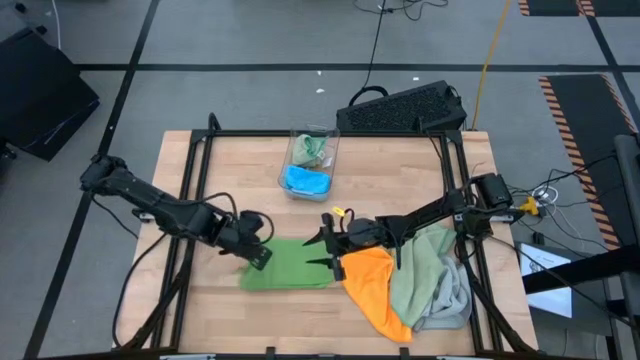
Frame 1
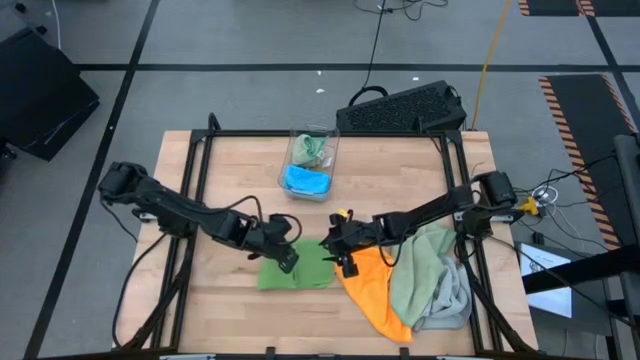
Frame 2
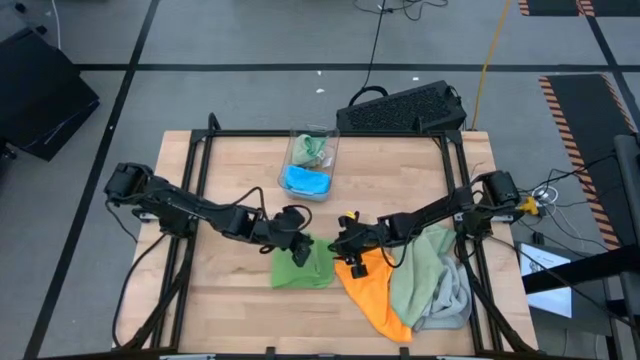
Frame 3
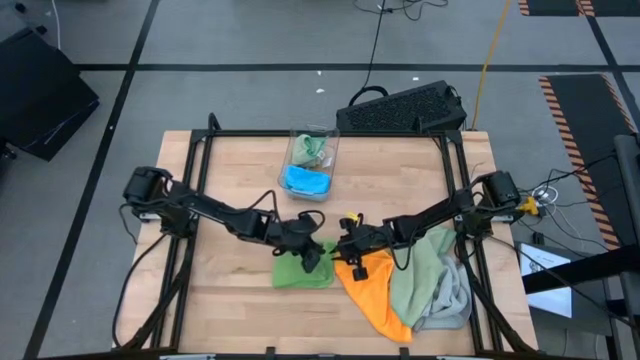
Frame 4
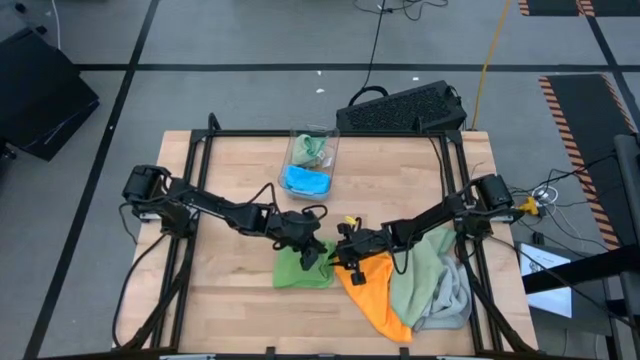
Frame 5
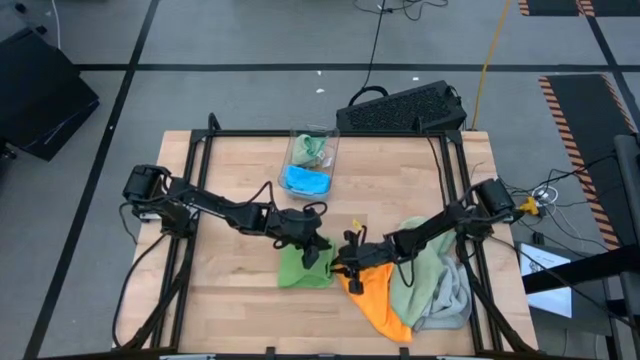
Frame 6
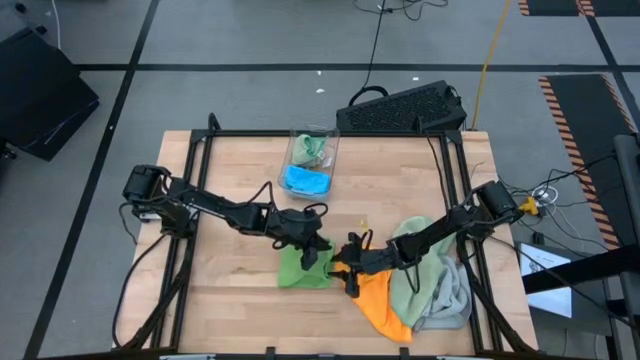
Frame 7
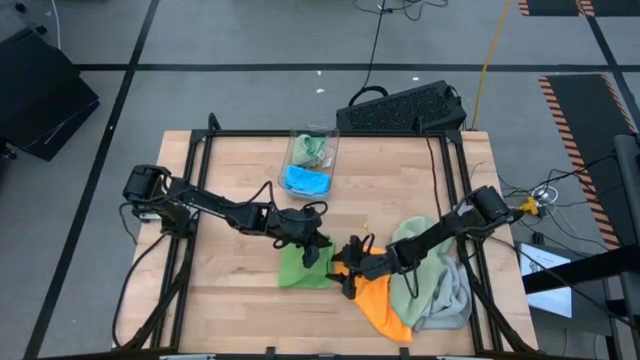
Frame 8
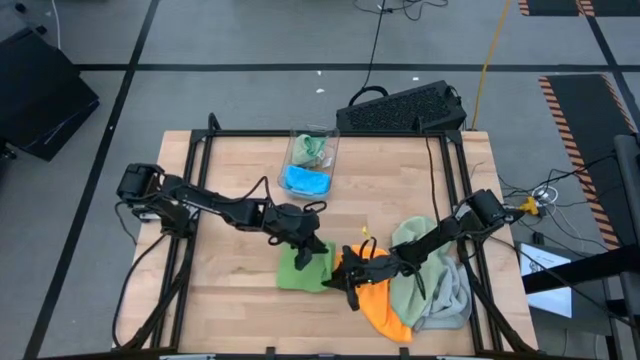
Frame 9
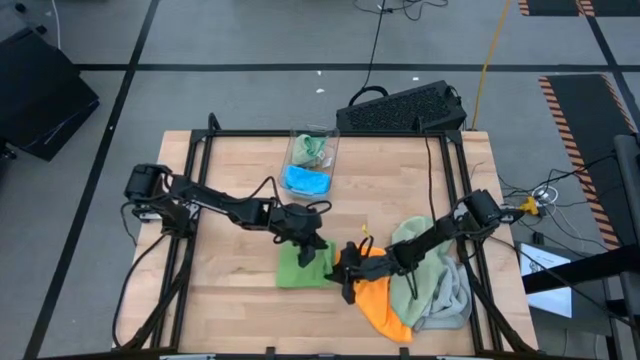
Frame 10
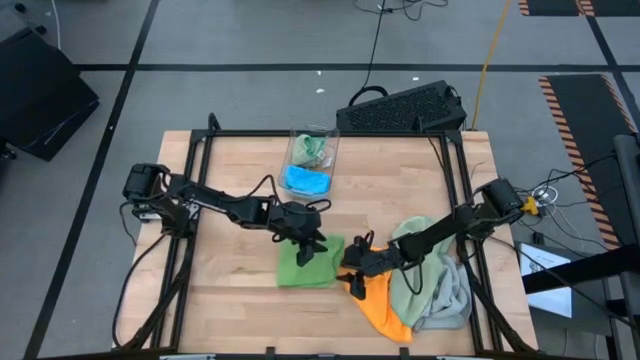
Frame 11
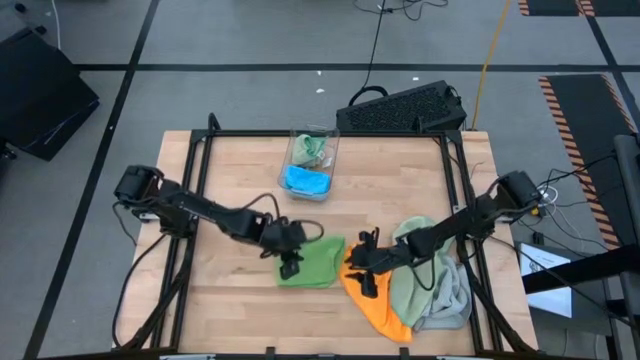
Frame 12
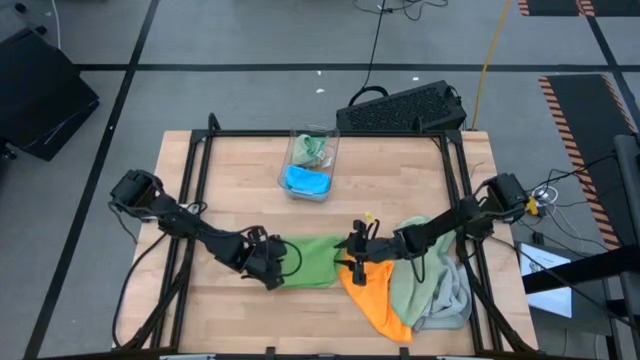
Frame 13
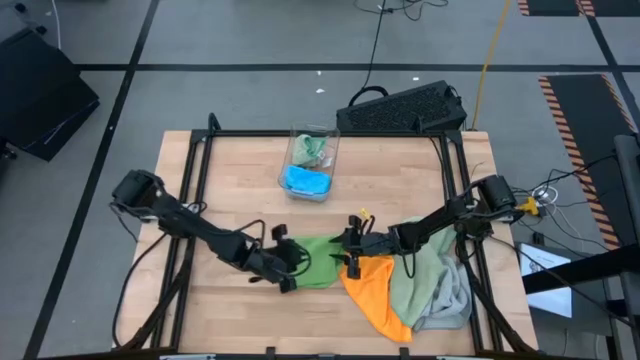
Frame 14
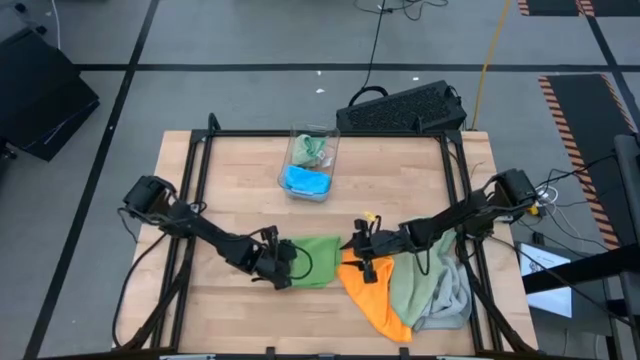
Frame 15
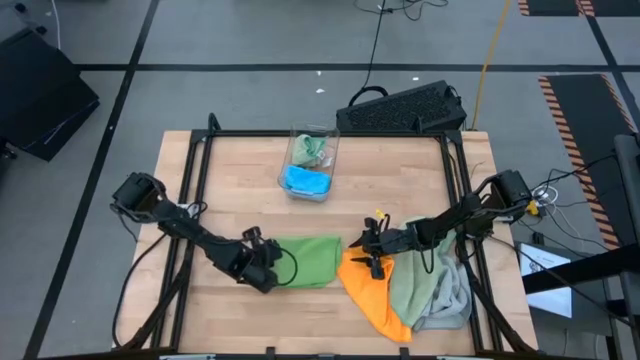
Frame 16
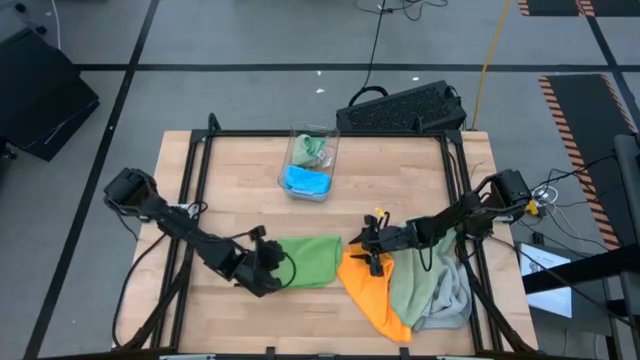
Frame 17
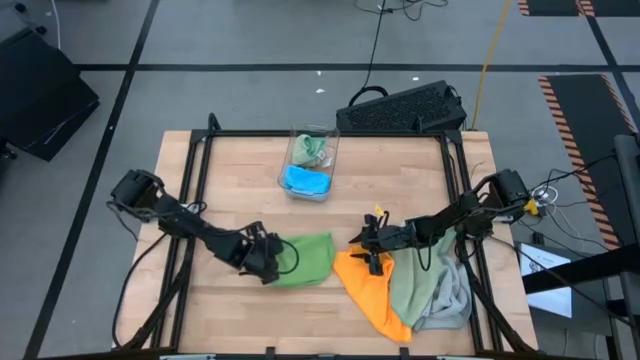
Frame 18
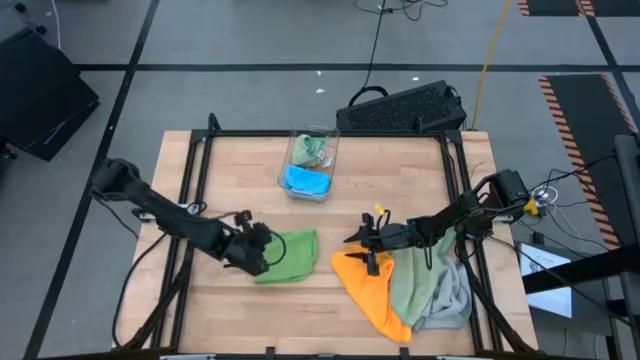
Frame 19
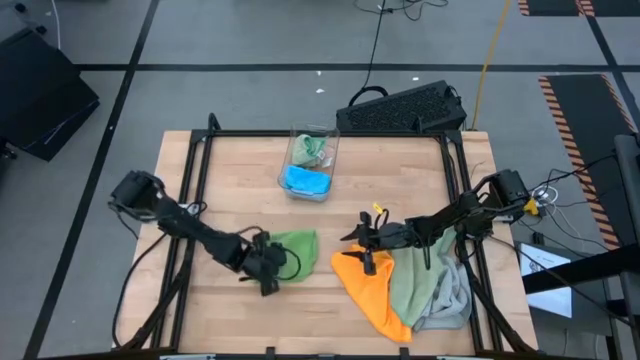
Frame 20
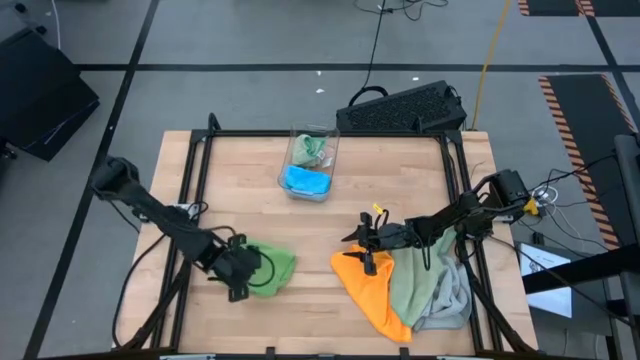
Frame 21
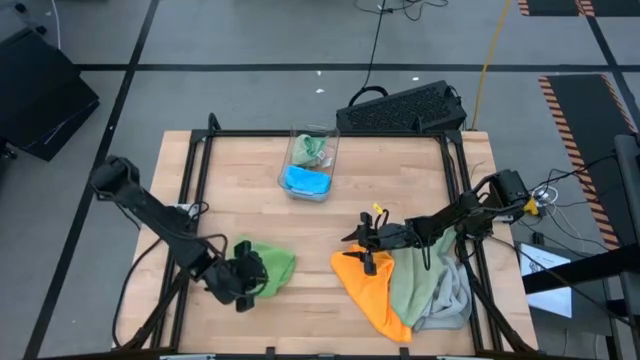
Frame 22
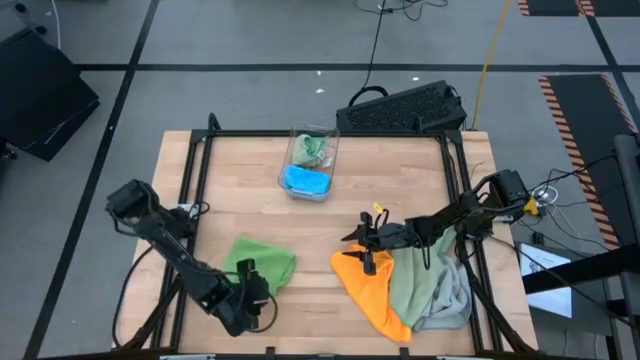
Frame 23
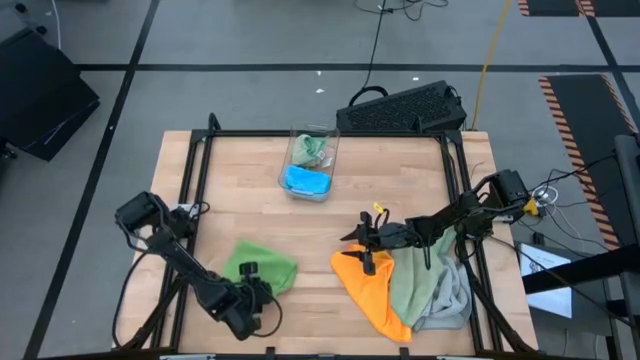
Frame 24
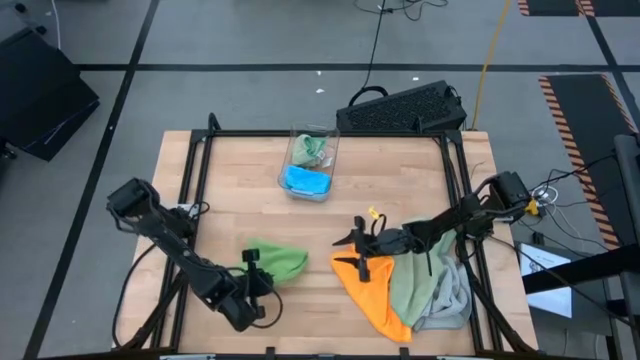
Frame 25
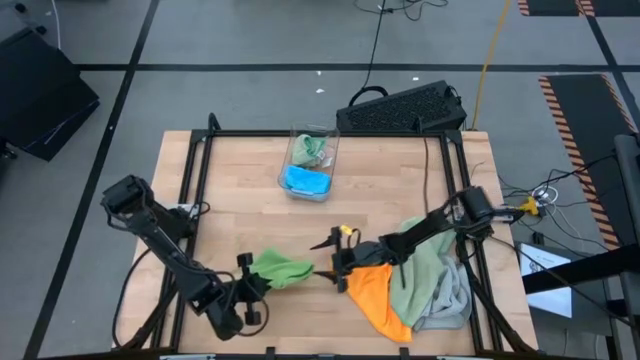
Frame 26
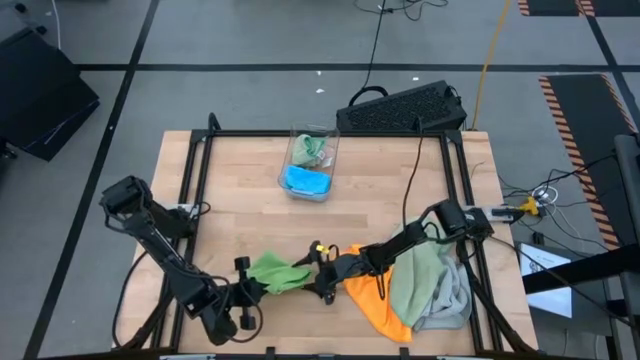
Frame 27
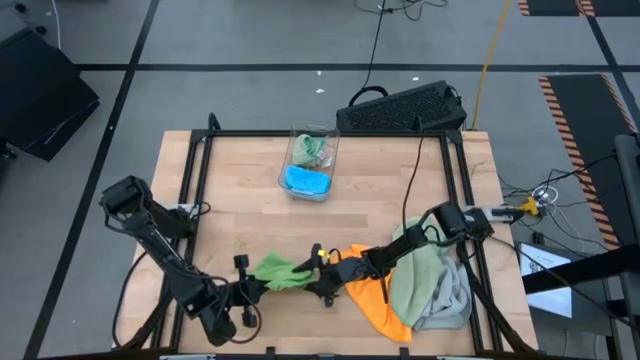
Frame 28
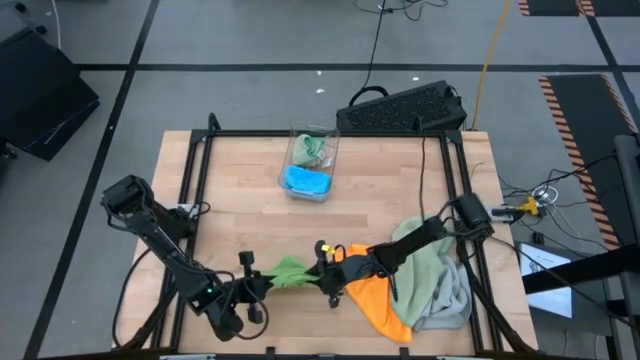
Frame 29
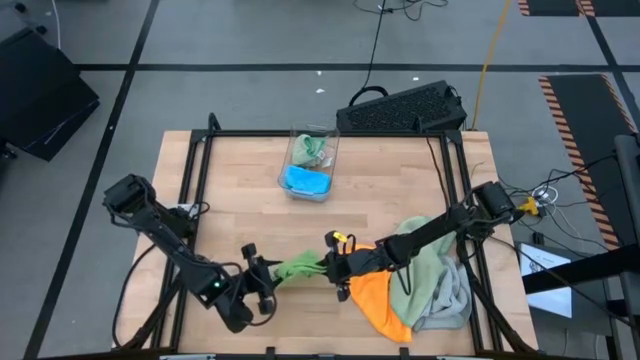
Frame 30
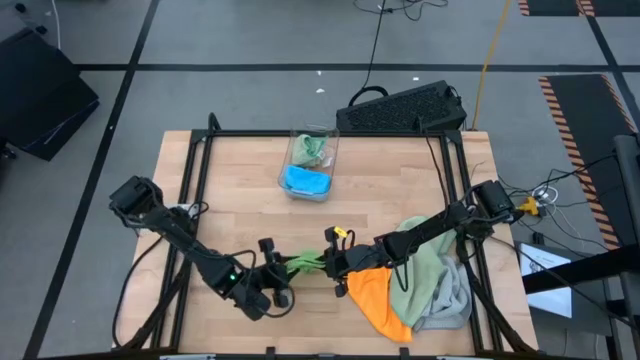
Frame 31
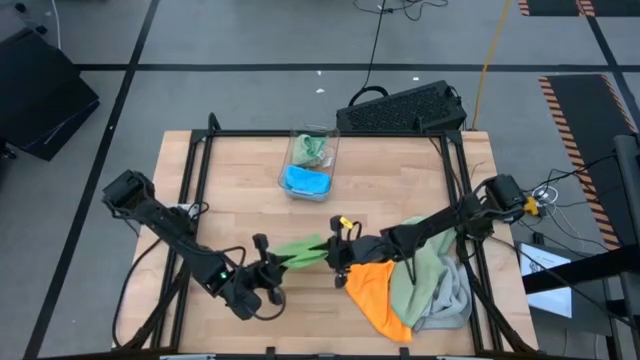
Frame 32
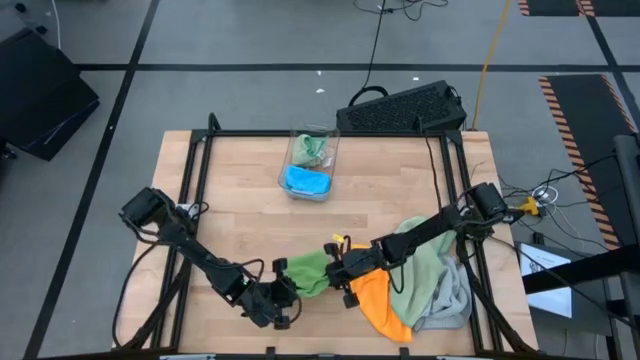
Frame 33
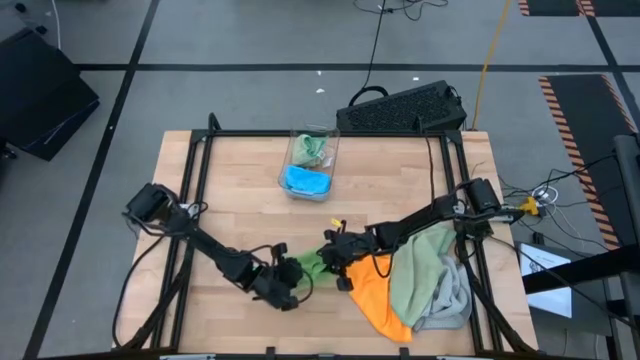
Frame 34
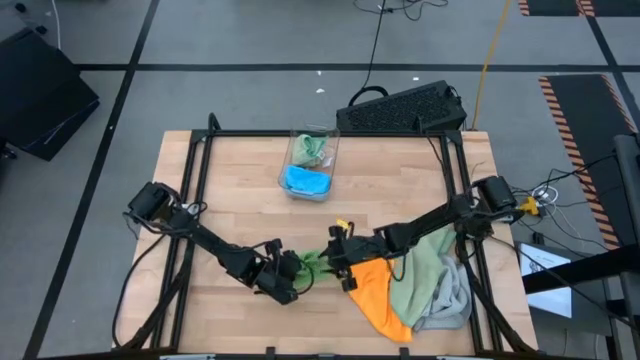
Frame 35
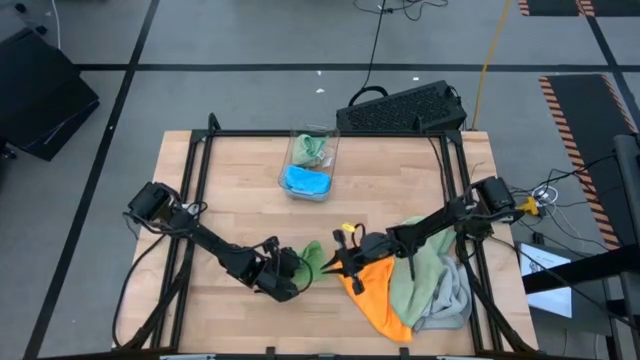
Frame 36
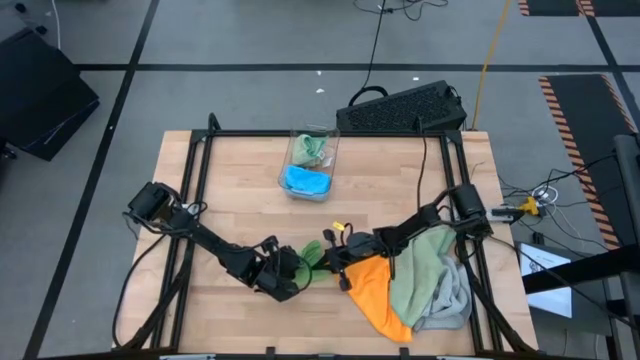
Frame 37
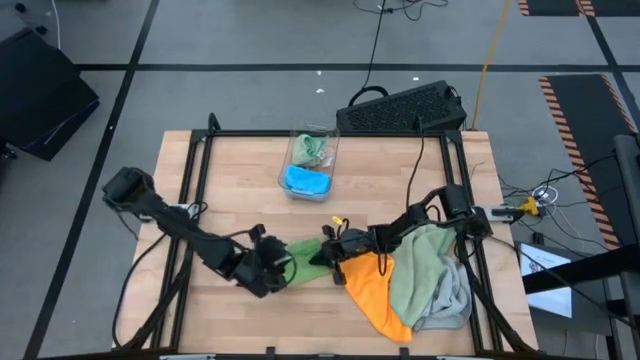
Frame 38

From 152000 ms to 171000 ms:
Task: Fold microfiber towels
Fold the green towel

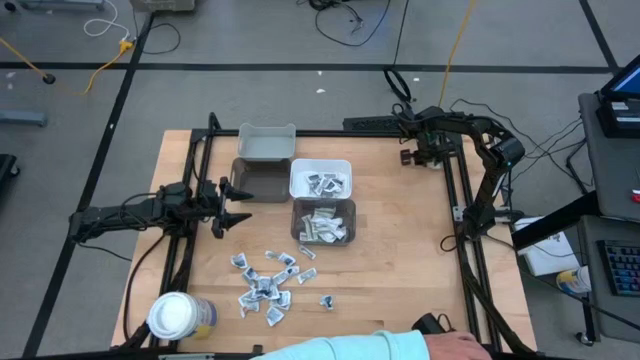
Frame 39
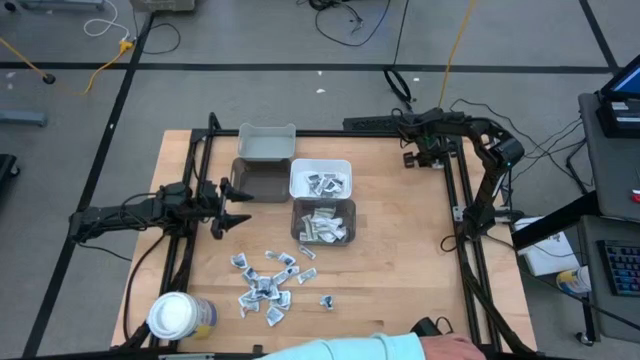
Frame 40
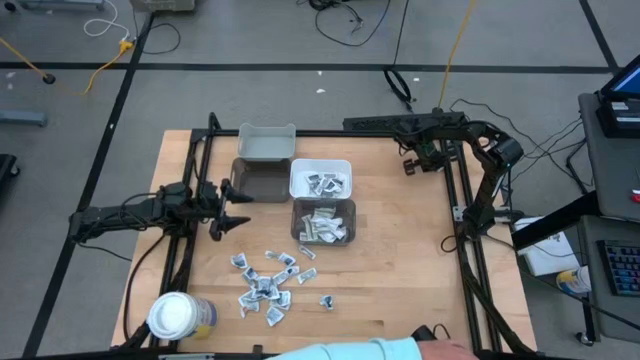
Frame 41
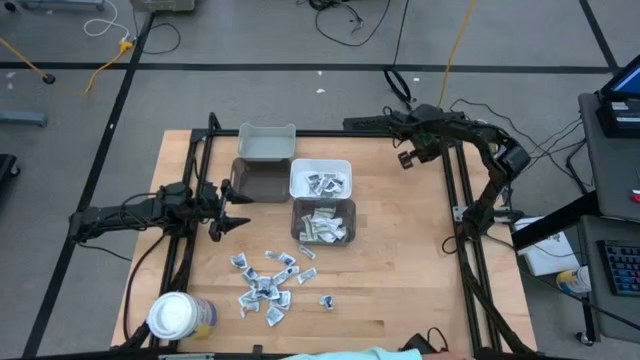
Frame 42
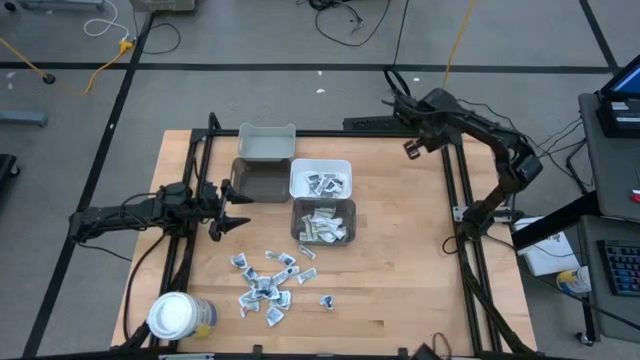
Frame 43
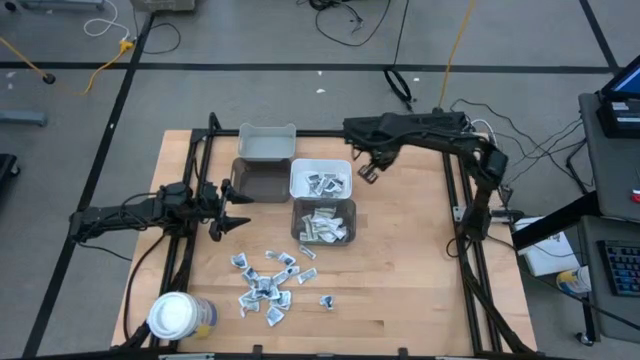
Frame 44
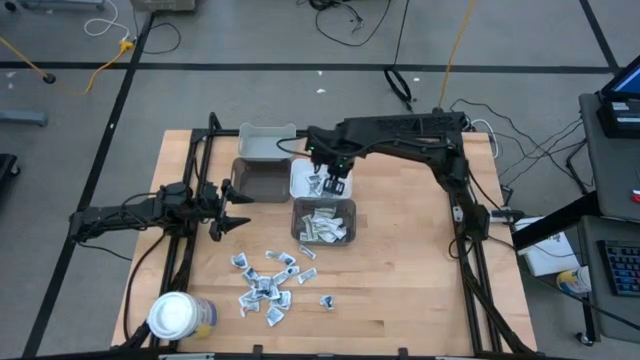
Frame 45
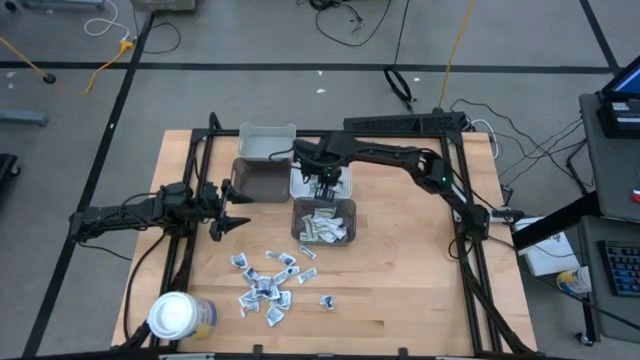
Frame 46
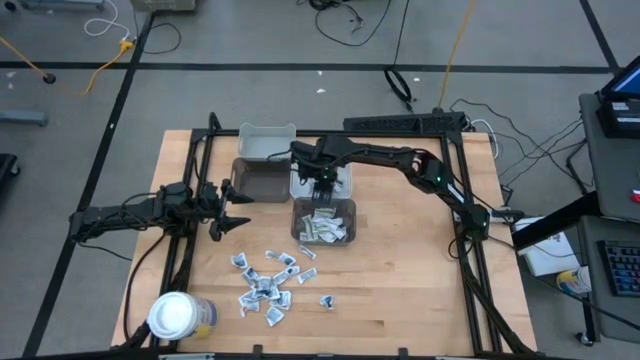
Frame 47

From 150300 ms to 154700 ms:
Task: Pick & Place First Aid Supplies
Put the gray towelette pack into the white bin
